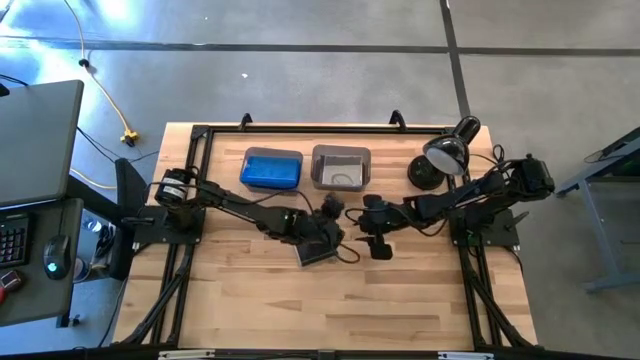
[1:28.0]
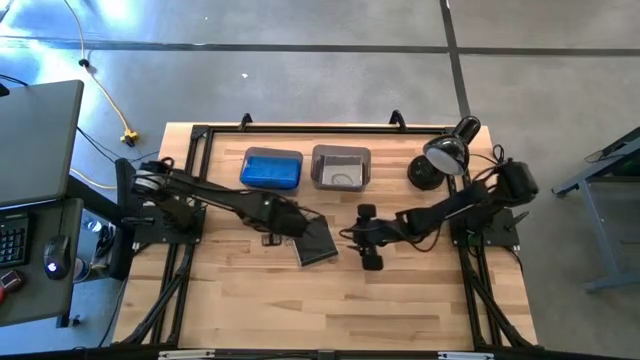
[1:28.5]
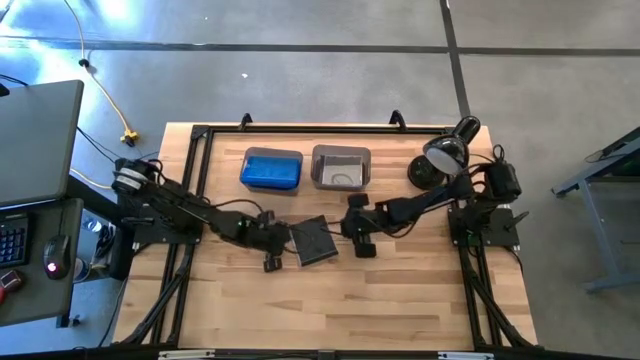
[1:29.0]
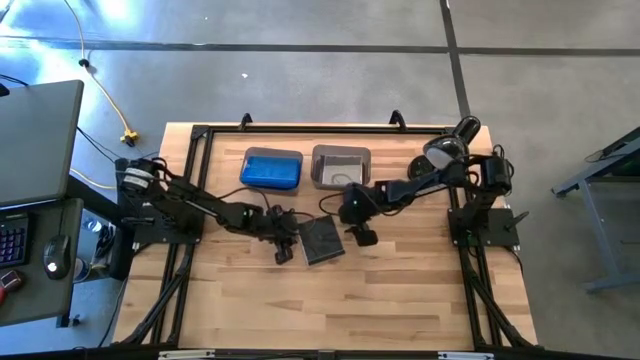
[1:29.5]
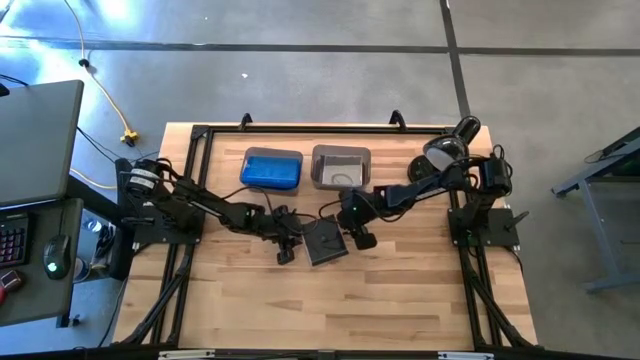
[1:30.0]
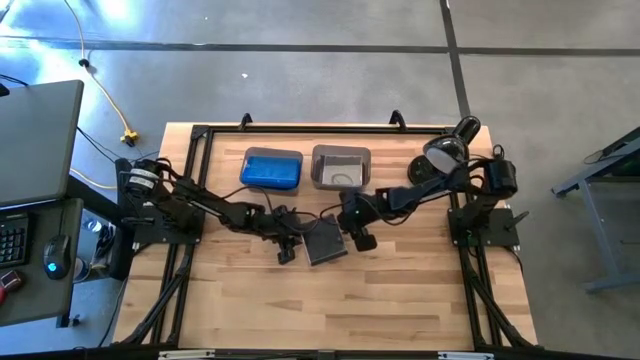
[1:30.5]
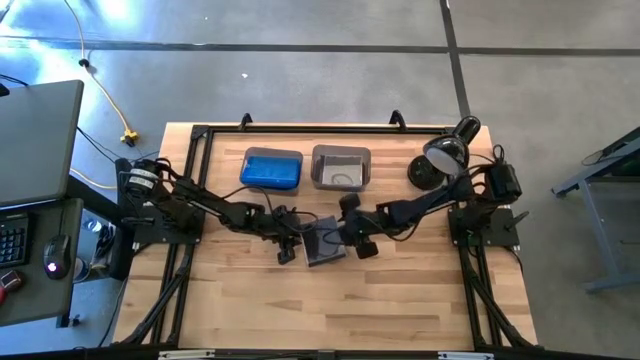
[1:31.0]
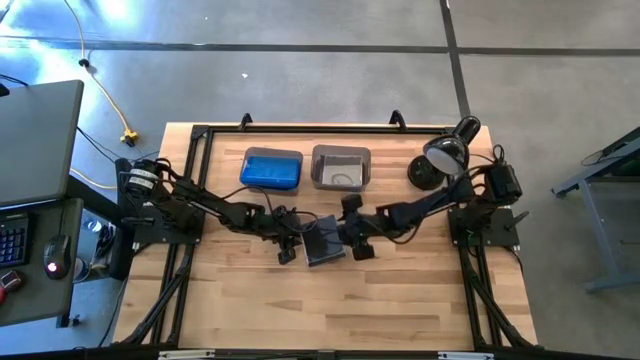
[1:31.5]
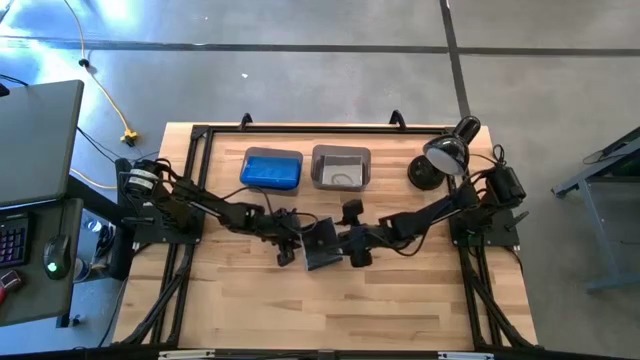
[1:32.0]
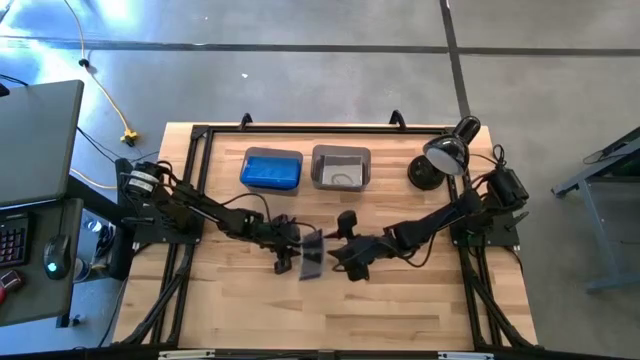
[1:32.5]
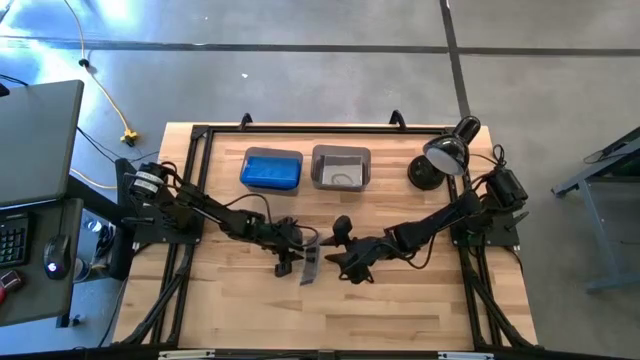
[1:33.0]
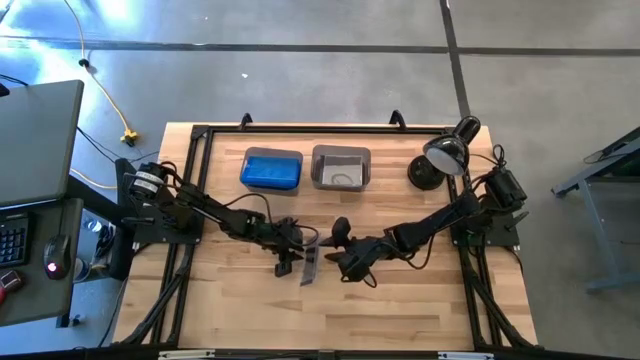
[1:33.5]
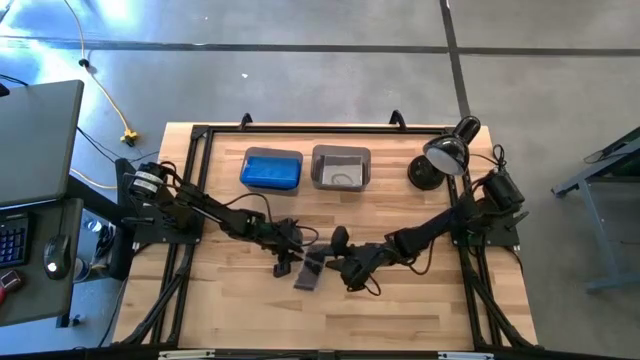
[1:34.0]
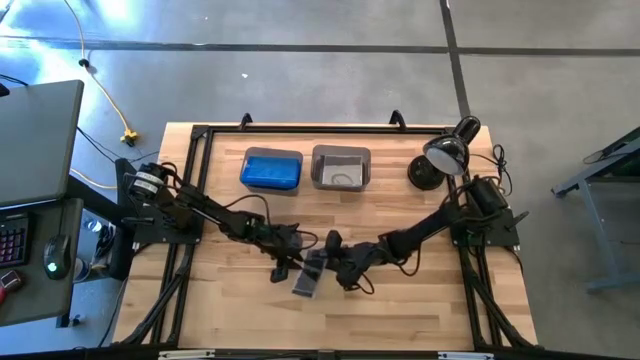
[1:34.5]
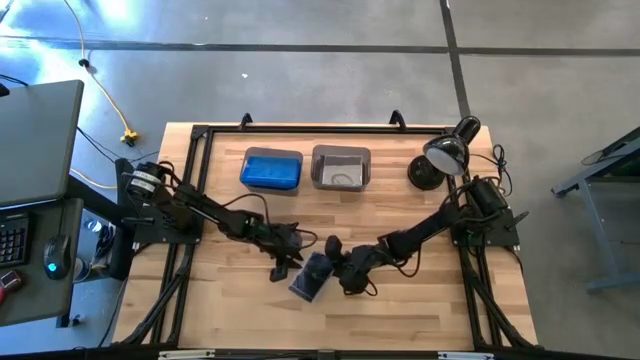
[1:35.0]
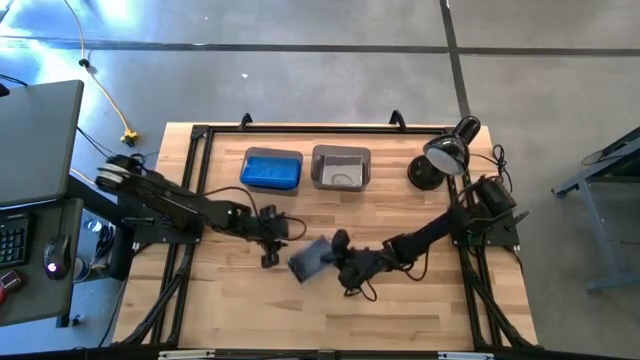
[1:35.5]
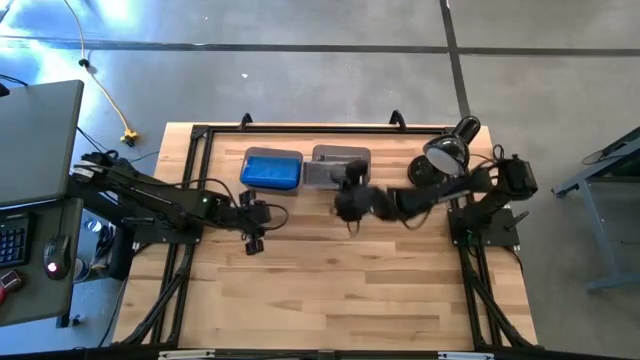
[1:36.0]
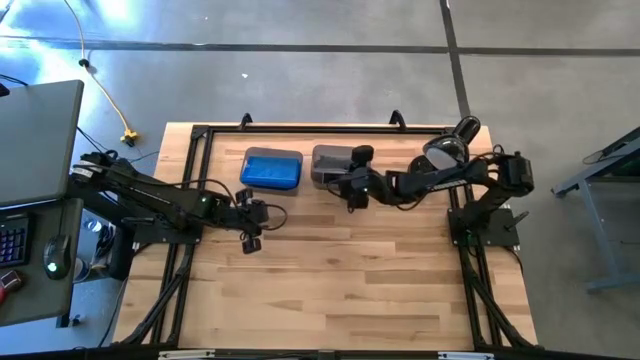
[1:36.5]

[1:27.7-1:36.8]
Task: Pick & place jewel cases by type
Put the black CD case into the right black bin

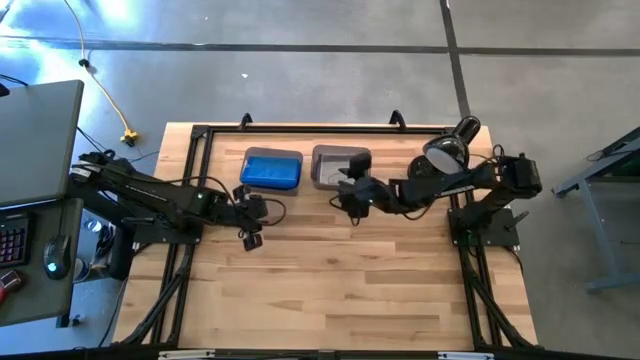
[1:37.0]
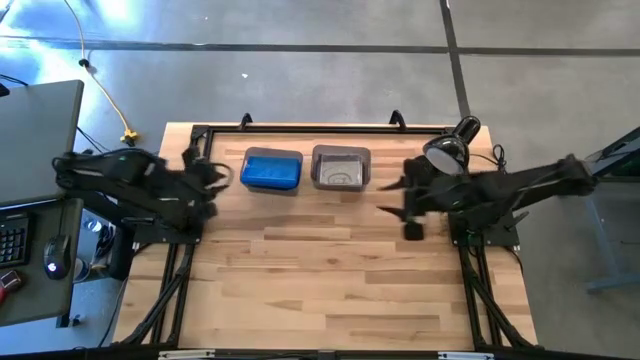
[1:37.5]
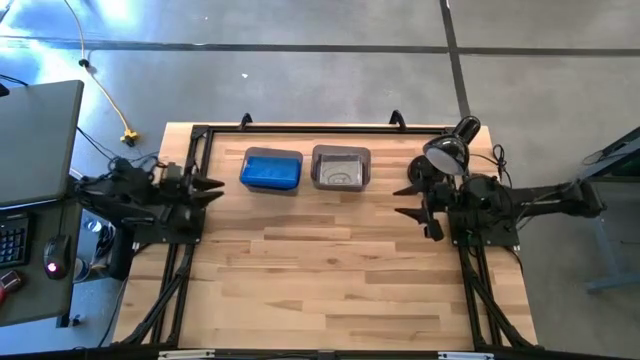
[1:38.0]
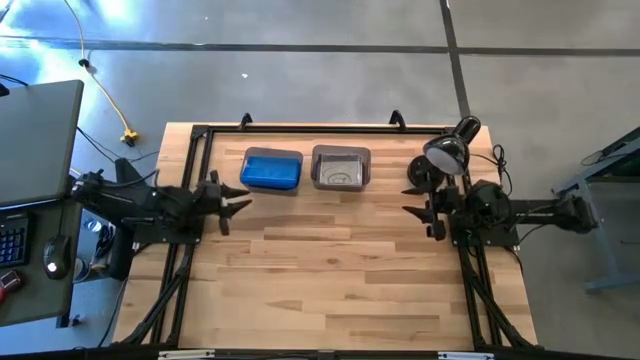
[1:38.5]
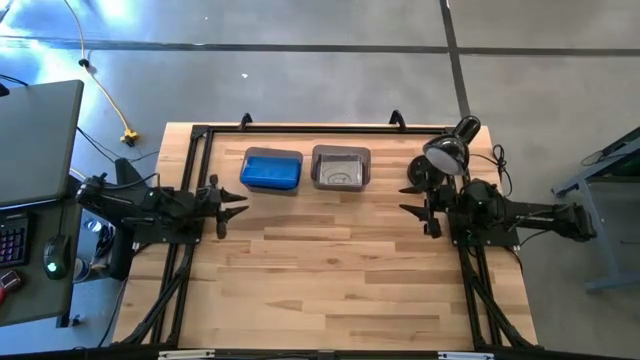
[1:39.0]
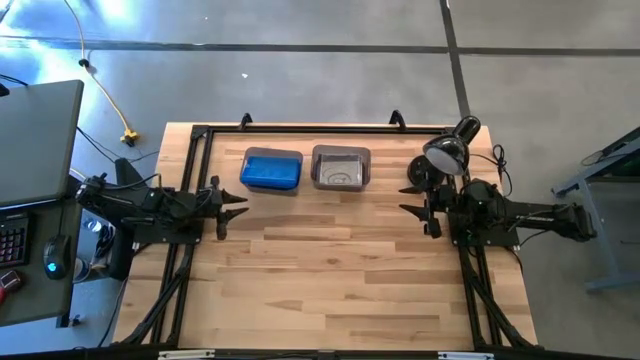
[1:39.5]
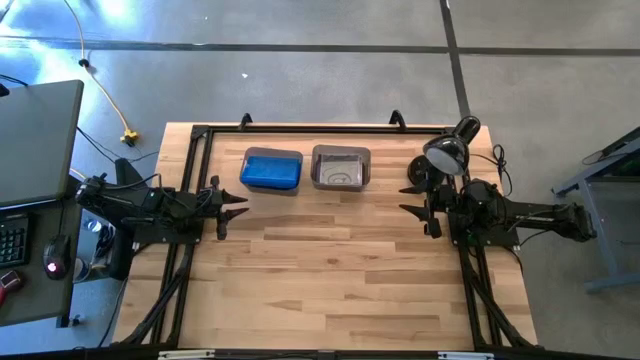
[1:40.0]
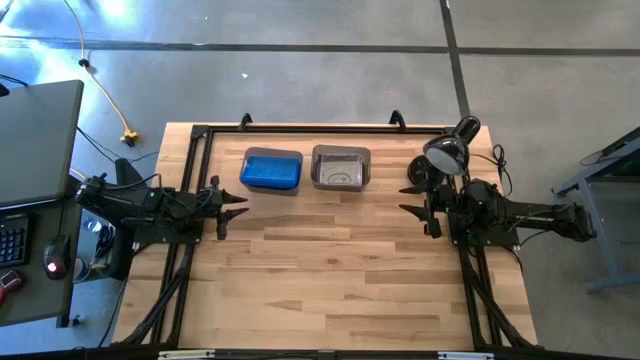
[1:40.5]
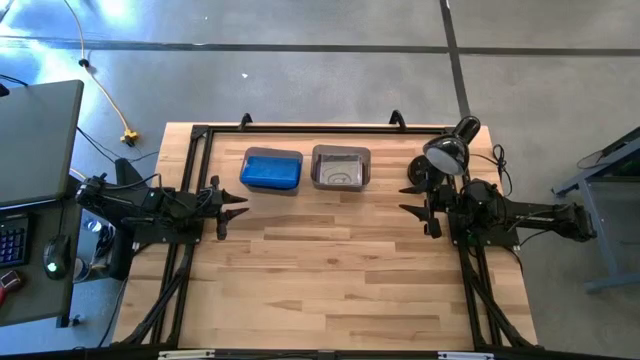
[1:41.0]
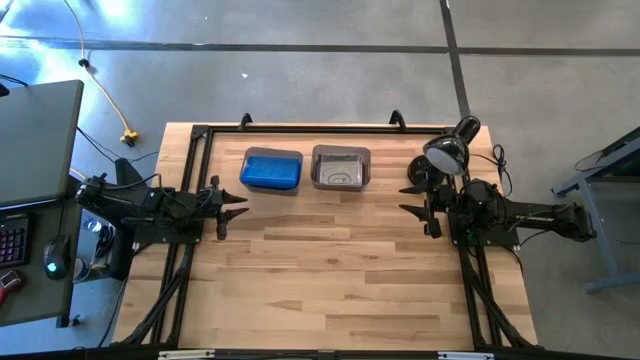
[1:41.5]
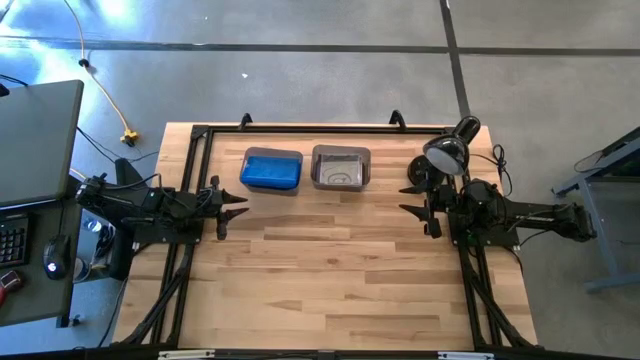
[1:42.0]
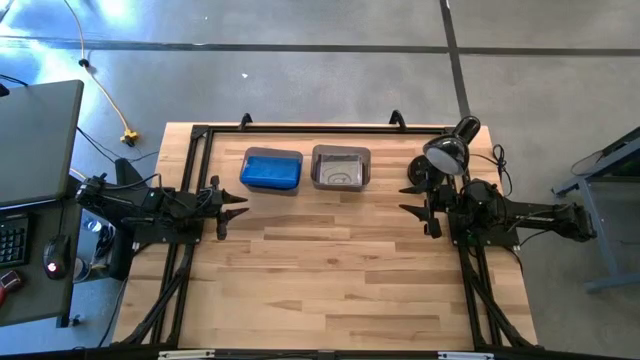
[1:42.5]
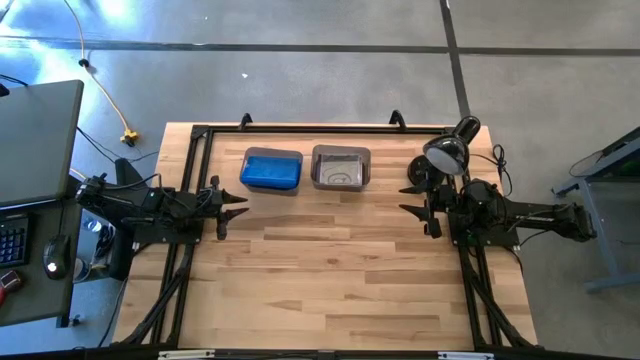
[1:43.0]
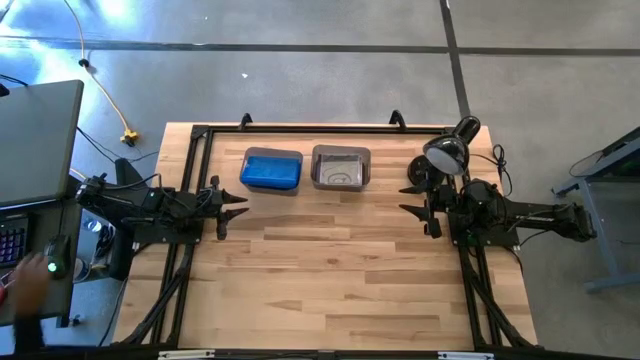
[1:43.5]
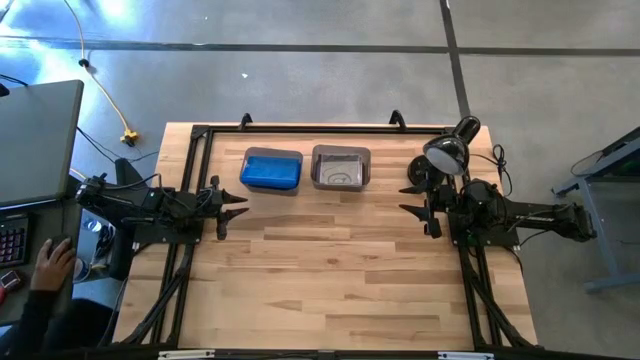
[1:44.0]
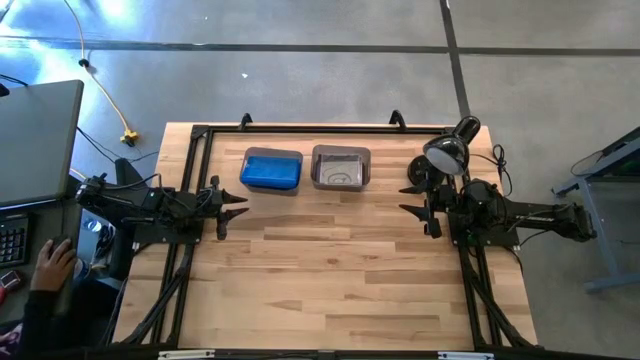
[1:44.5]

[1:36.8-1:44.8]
Return to Home Position

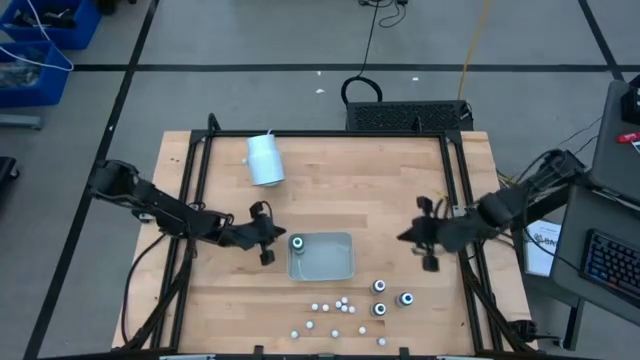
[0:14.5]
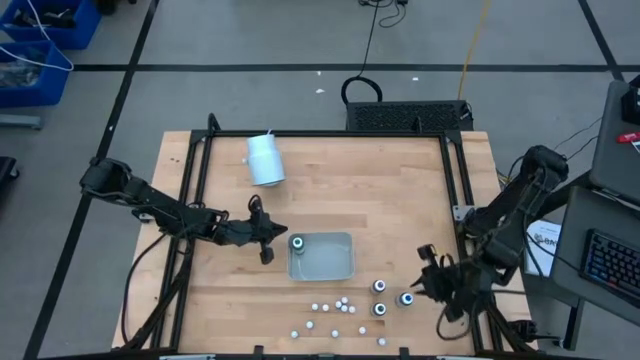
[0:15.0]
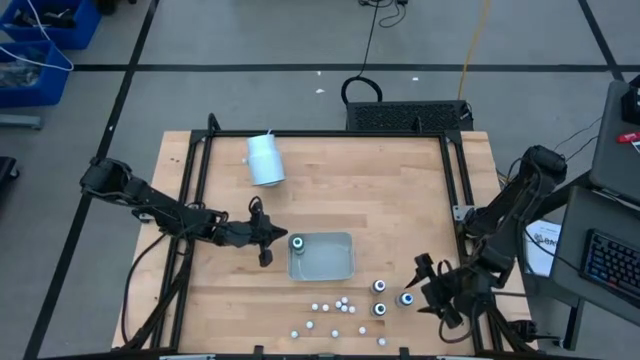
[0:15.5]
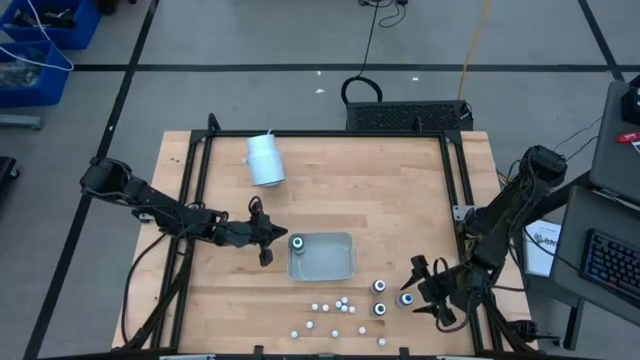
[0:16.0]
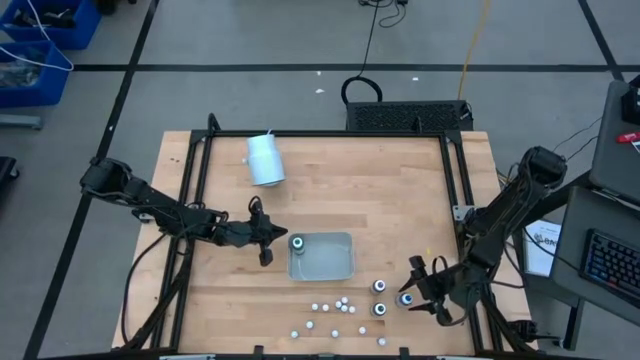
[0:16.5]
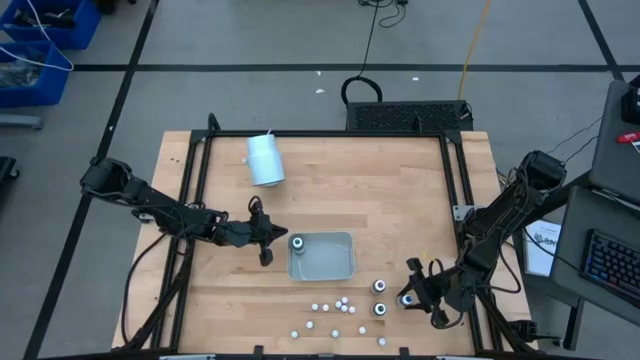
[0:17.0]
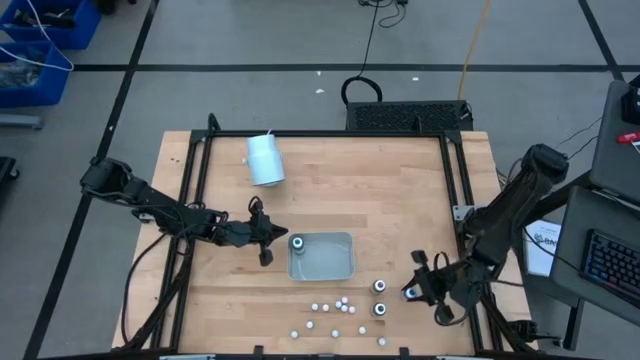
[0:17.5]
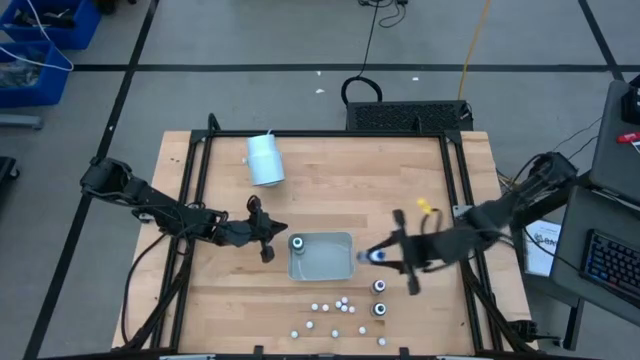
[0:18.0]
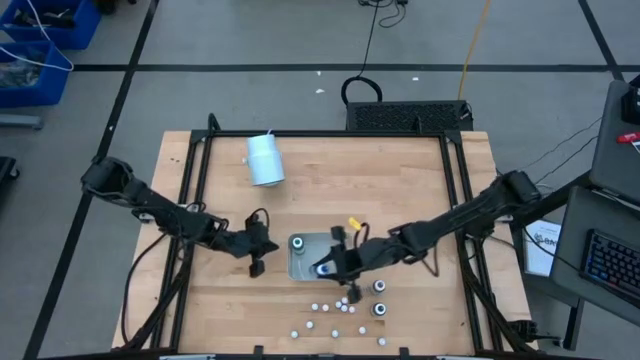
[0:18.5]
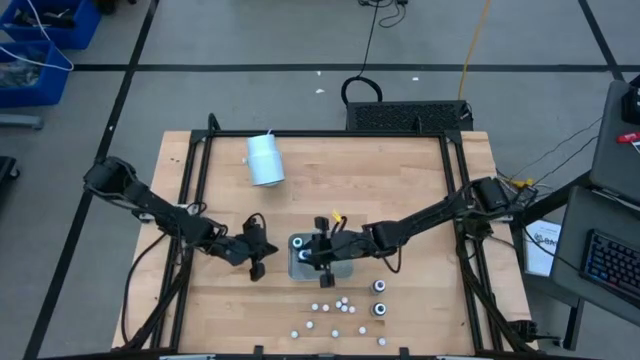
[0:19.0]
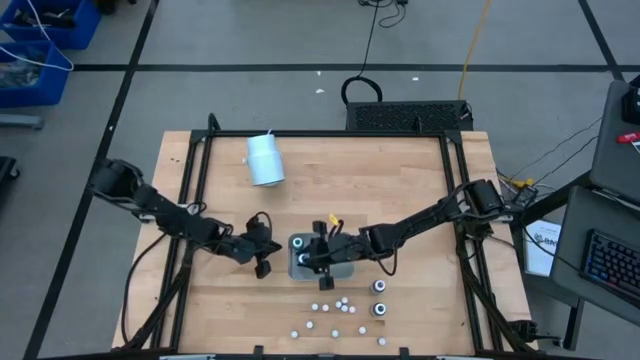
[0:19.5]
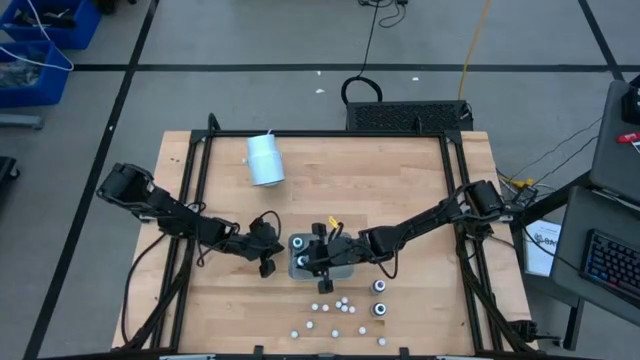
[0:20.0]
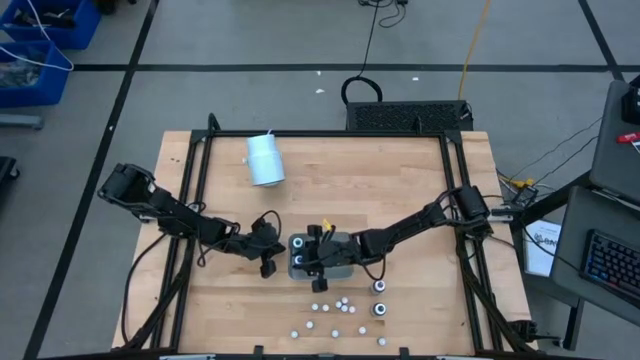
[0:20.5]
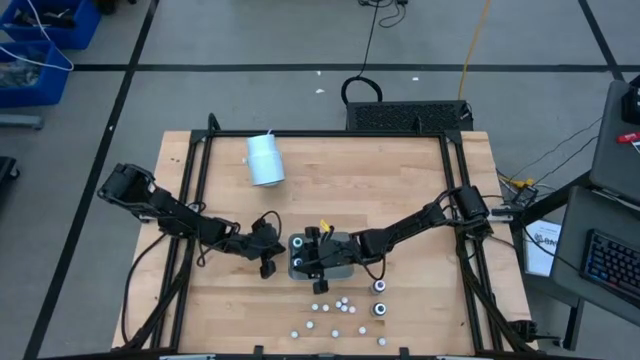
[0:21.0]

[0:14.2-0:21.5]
Task: Pick & Place food coloring
Put the big blue food coloring bottle into the gray bin
